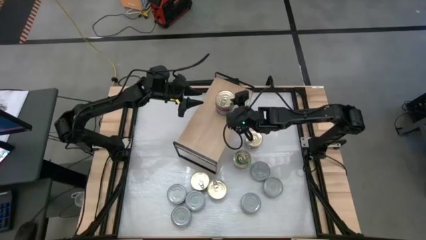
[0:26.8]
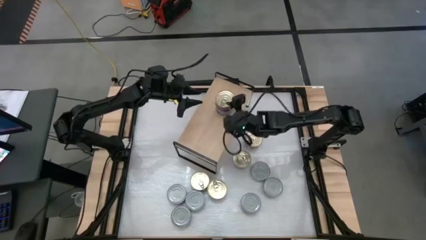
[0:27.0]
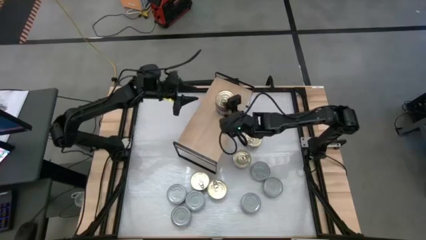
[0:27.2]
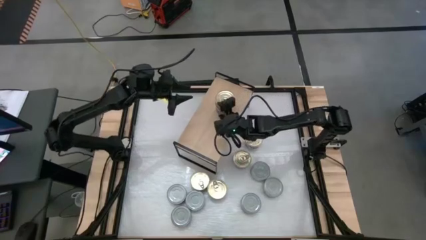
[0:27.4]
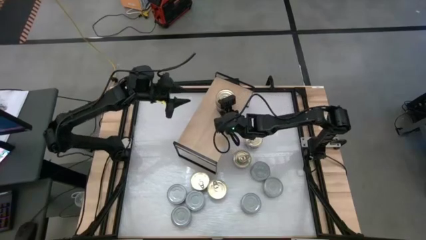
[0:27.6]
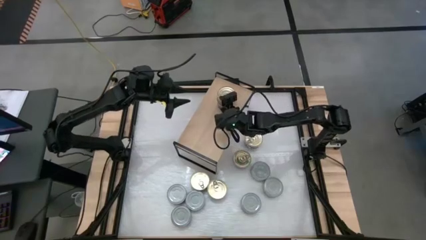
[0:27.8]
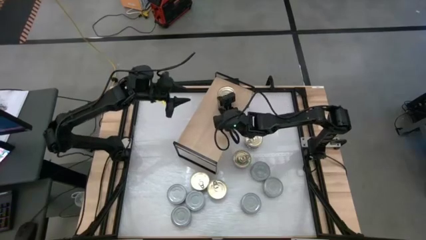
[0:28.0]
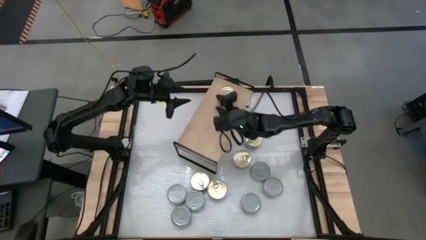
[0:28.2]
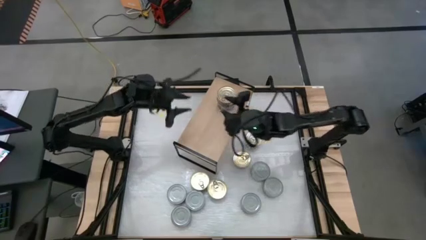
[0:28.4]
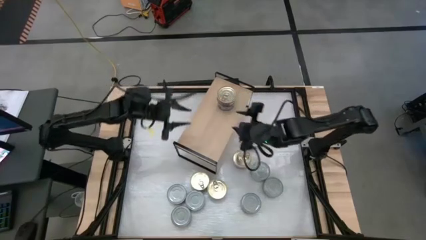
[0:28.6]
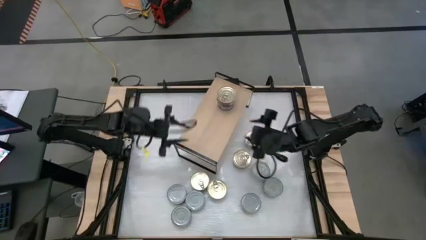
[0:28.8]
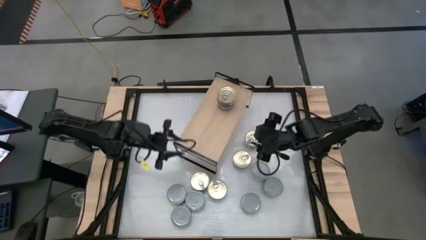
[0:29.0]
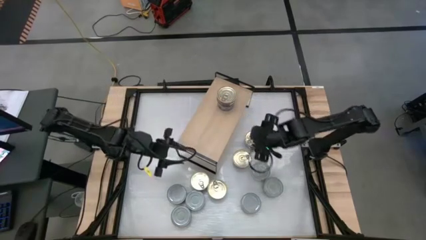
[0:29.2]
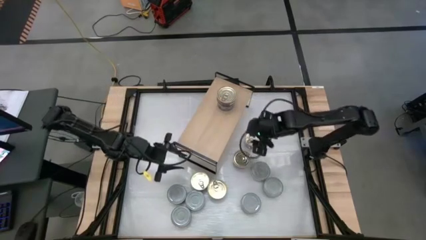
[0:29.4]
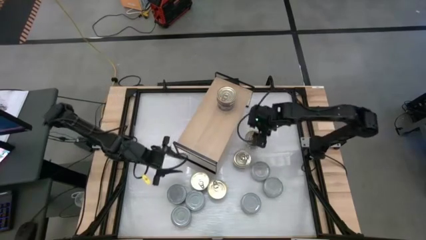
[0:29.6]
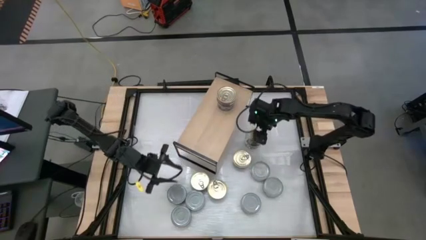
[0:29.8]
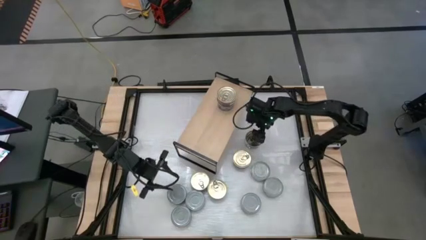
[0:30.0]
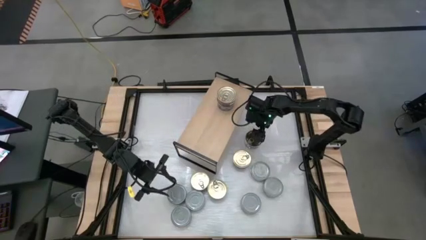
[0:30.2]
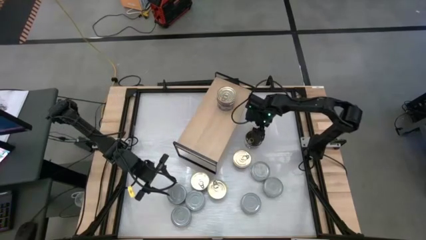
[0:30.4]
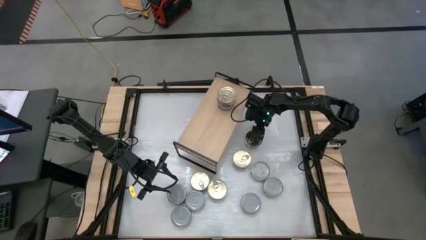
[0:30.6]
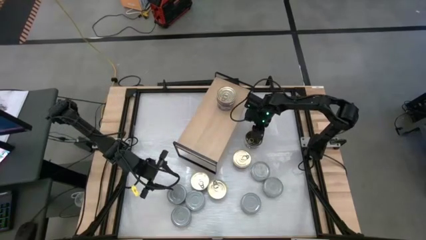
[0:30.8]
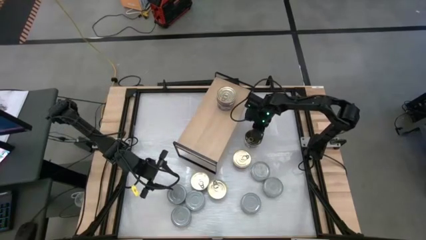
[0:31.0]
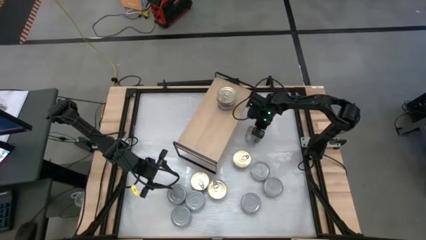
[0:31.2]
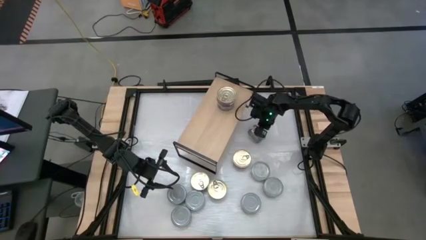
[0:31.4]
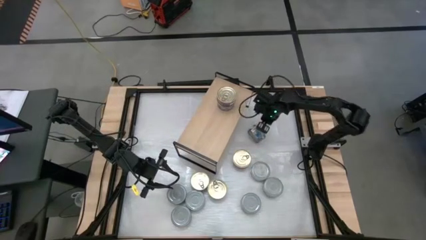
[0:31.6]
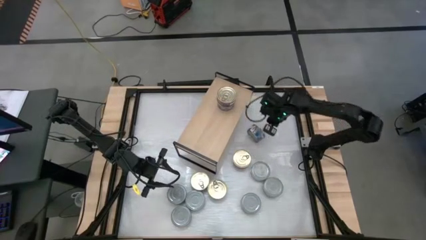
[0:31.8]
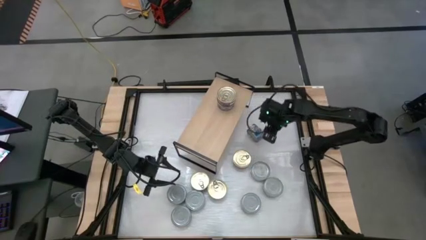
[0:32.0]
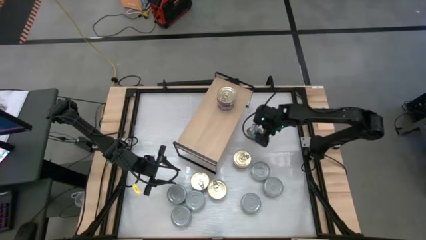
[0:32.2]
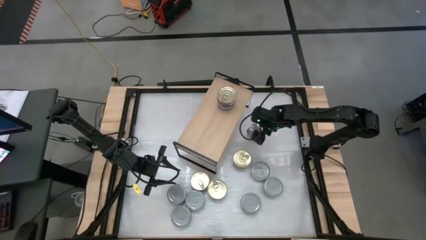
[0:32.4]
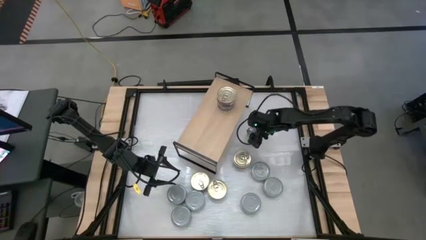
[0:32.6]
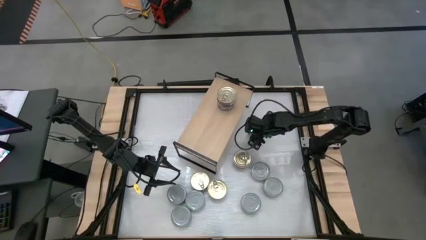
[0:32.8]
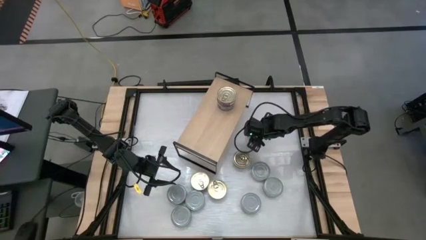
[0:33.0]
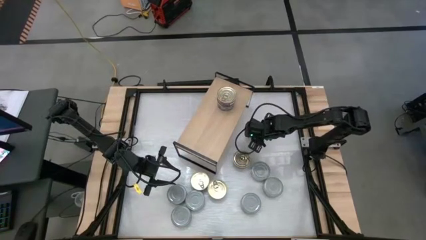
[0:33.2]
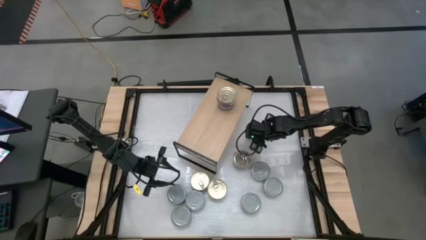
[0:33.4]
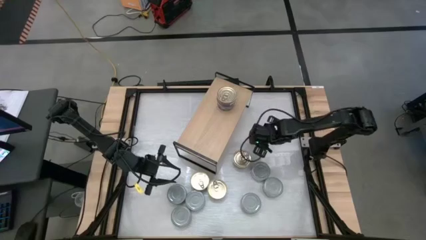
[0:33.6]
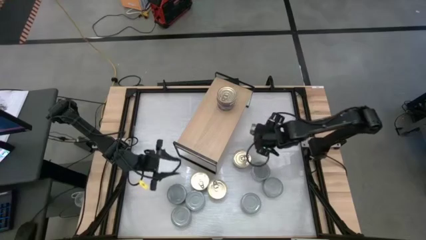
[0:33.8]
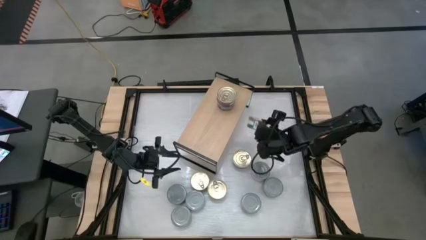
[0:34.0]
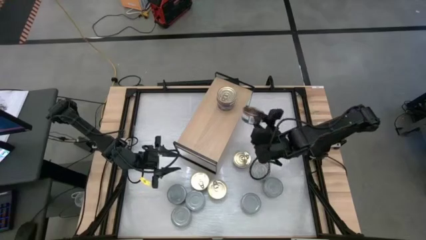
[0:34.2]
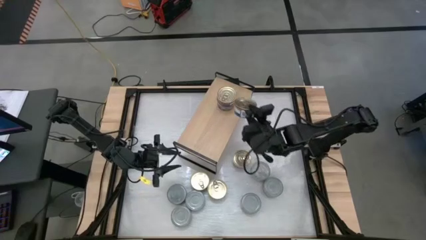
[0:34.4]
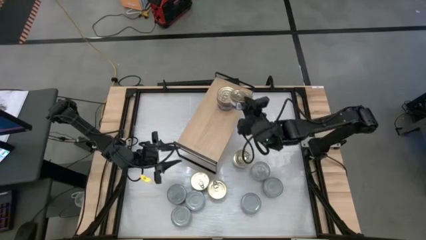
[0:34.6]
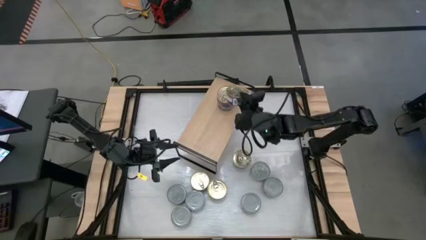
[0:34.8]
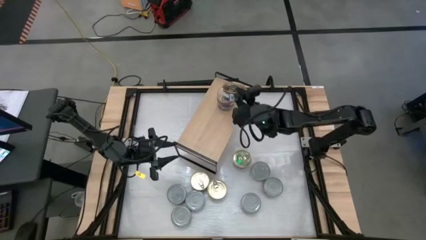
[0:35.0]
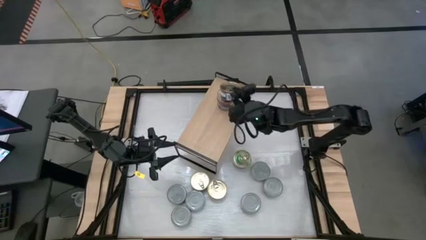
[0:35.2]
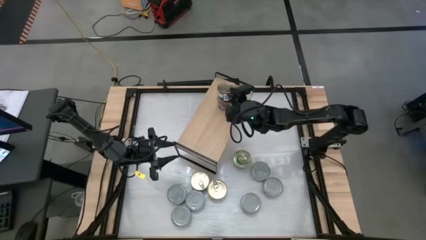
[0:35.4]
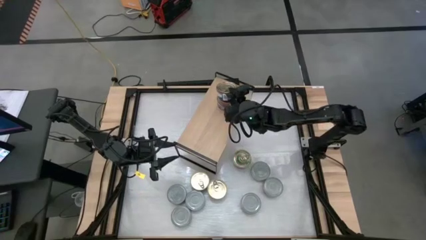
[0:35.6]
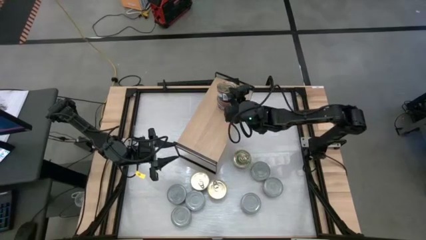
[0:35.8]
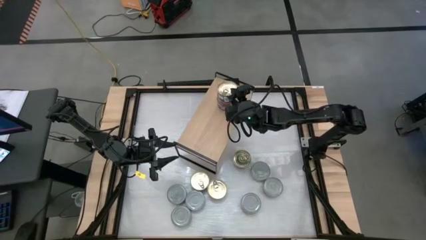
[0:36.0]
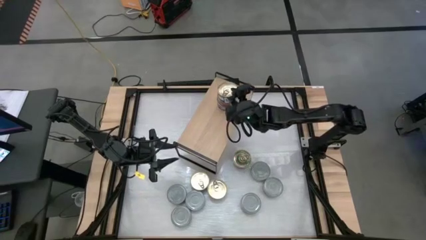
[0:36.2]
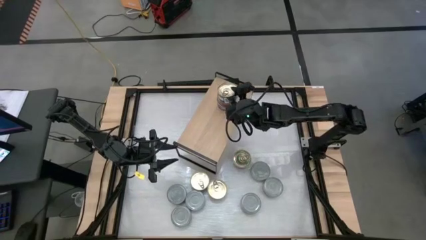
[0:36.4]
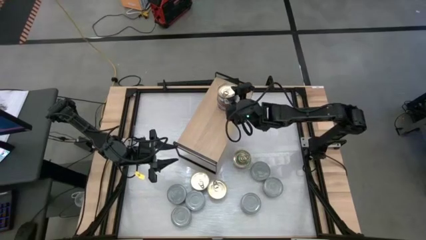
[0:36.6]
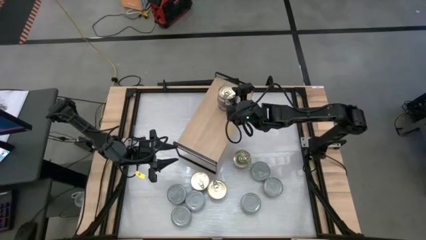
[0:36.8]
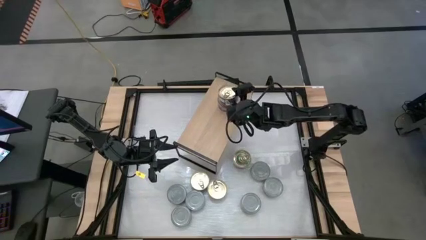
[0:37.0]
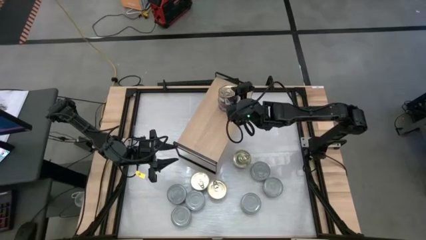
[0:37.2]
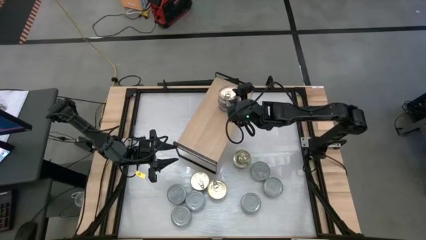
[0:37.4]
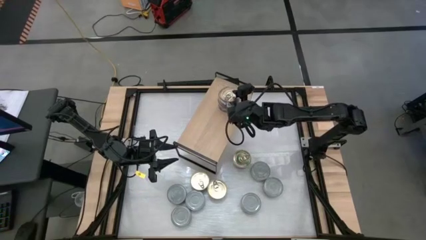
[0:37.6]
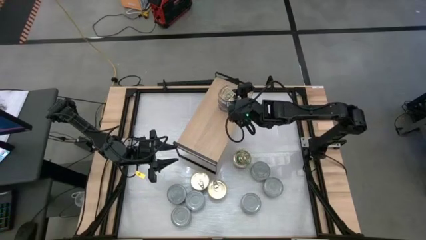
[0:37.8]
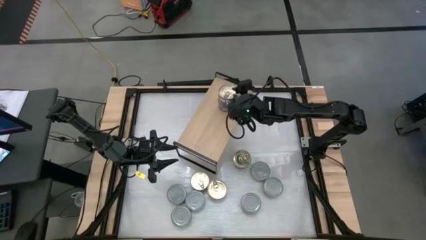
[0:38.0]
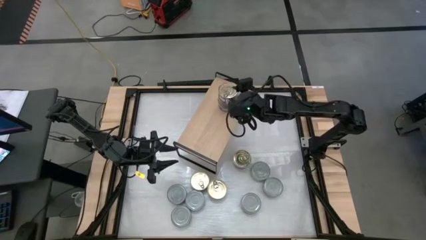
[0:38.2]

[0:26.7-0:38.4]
Task: Stack canned seafood by type on shelf
Stack the blue tuna can on top of the stacked blue tuna cans on the shelf
